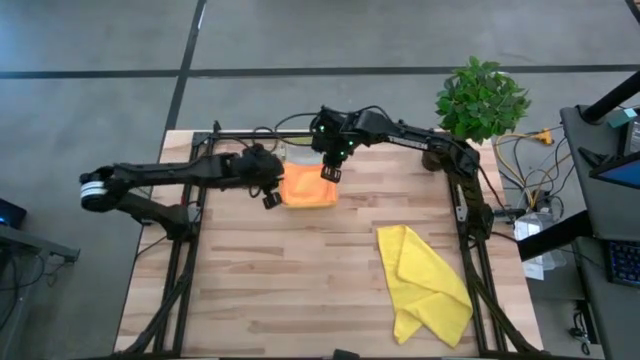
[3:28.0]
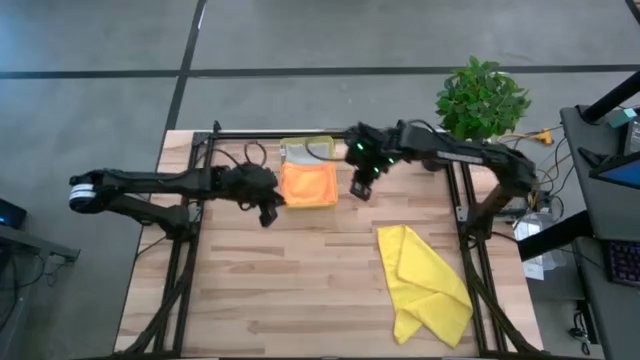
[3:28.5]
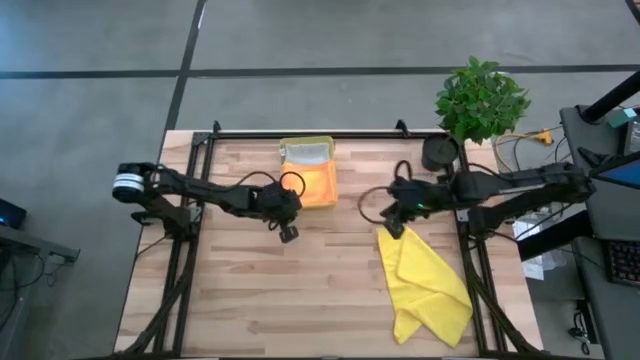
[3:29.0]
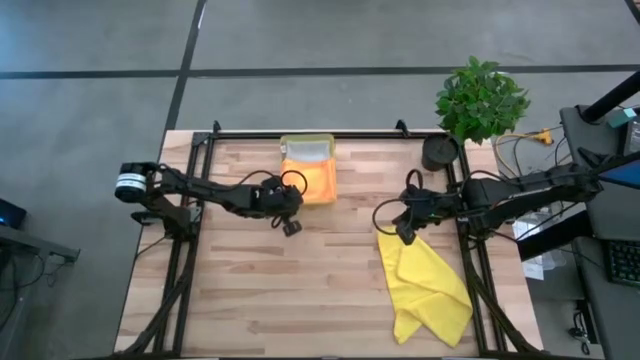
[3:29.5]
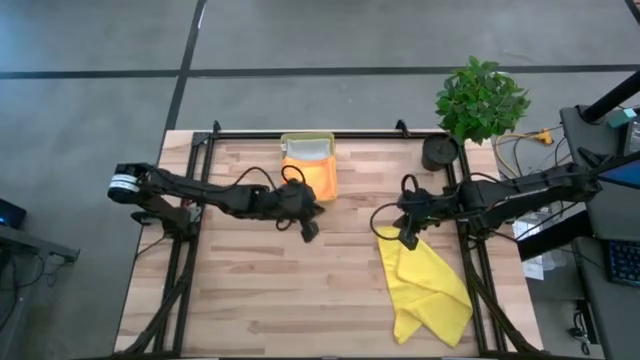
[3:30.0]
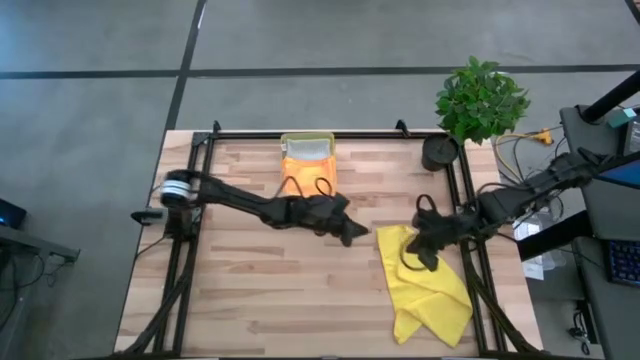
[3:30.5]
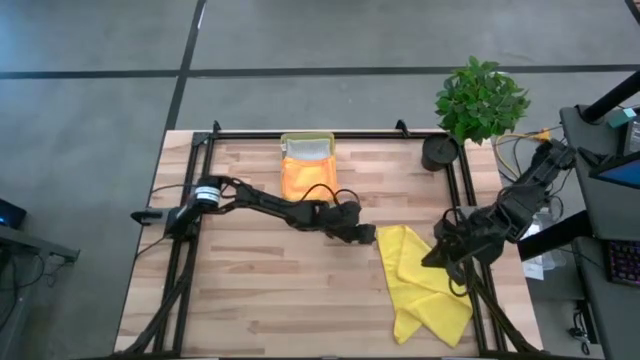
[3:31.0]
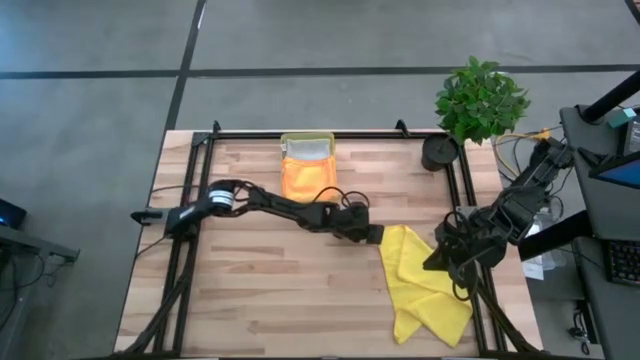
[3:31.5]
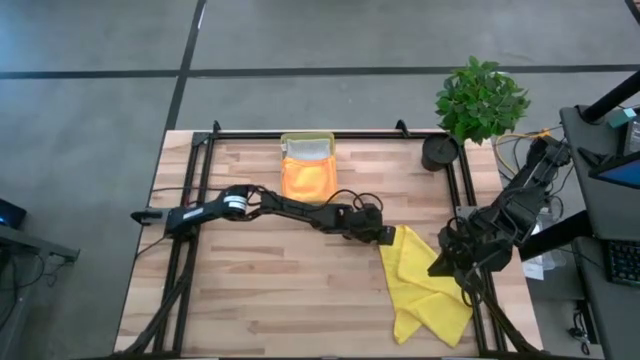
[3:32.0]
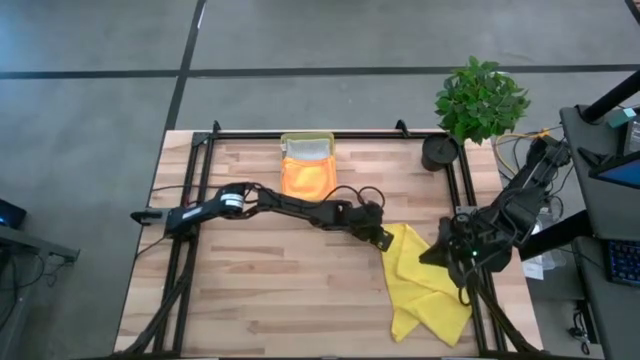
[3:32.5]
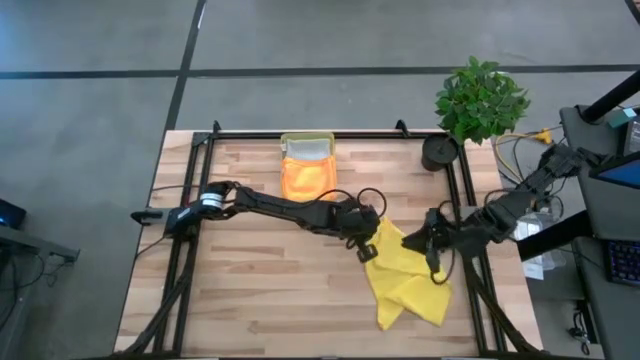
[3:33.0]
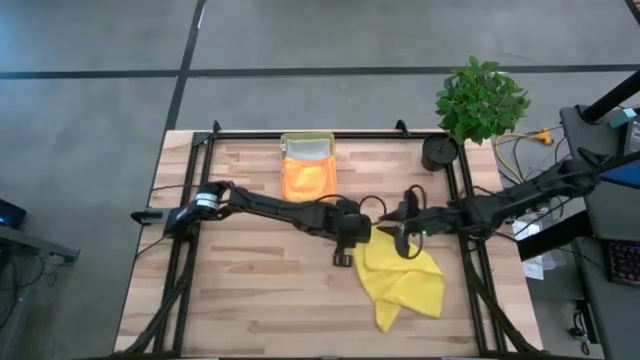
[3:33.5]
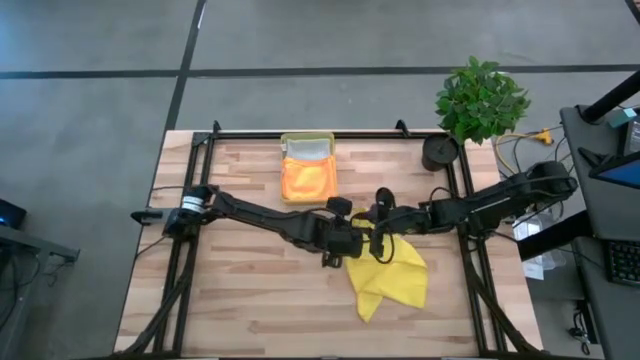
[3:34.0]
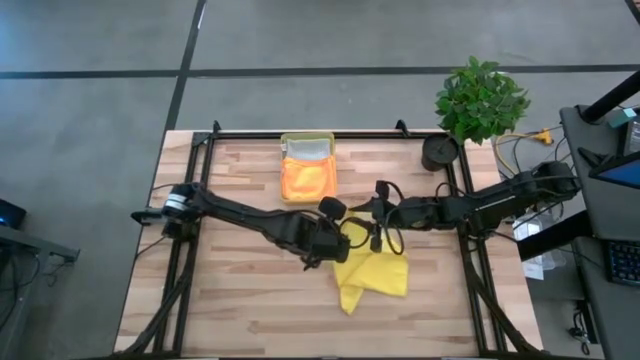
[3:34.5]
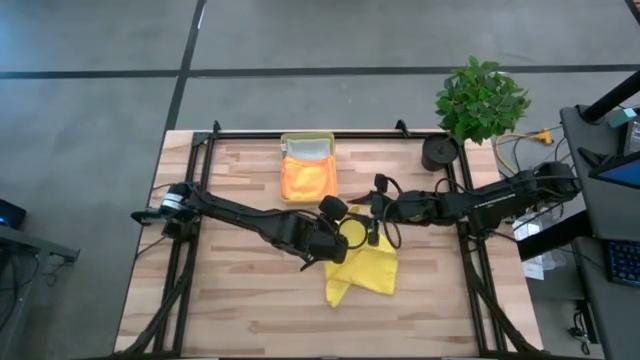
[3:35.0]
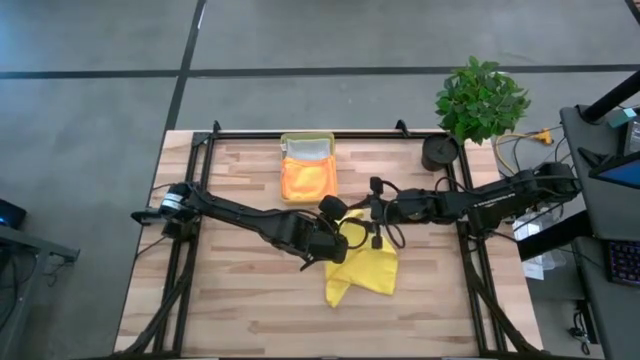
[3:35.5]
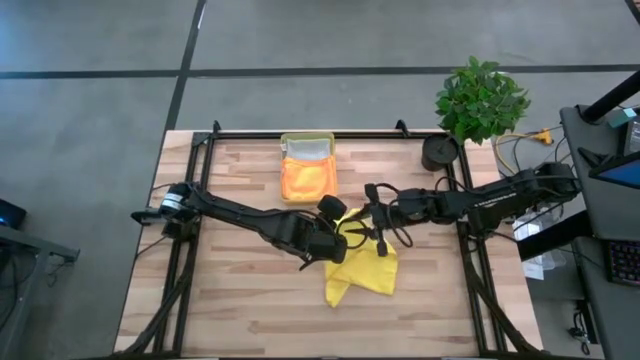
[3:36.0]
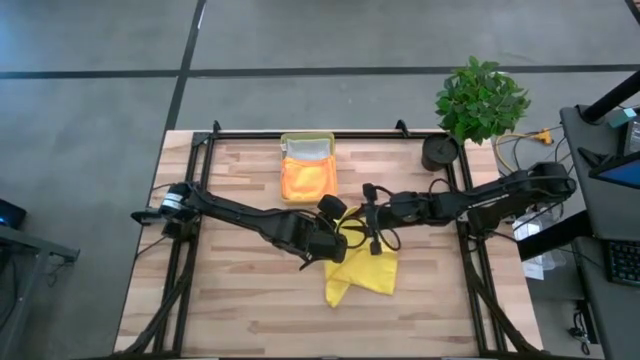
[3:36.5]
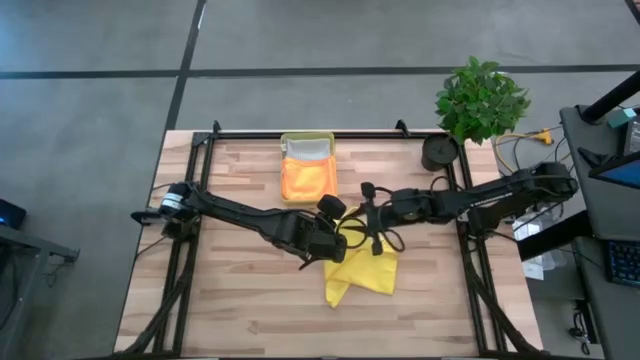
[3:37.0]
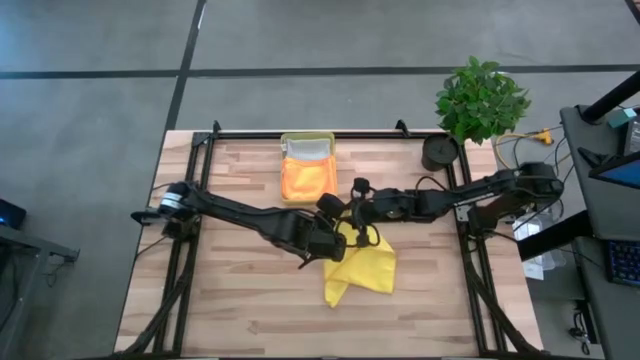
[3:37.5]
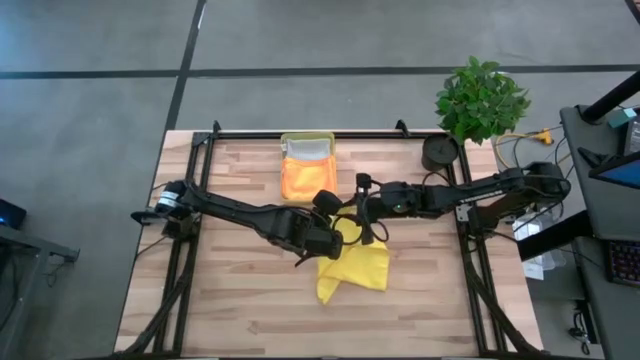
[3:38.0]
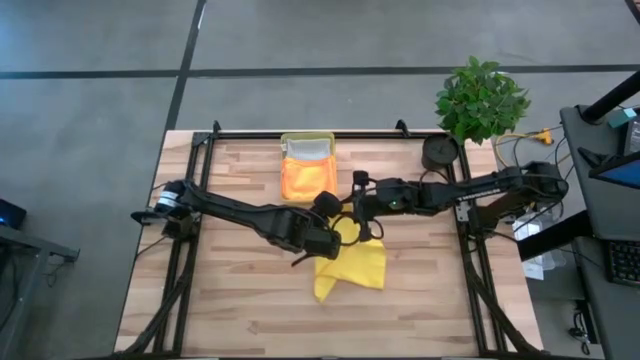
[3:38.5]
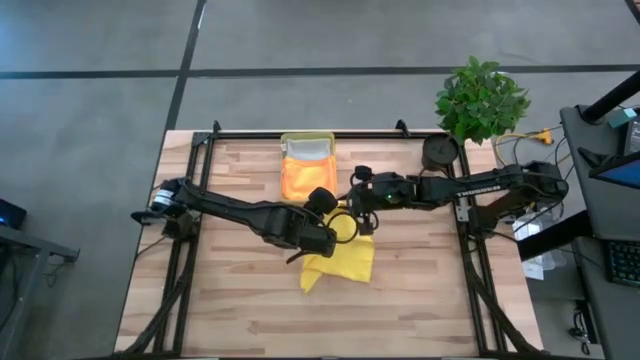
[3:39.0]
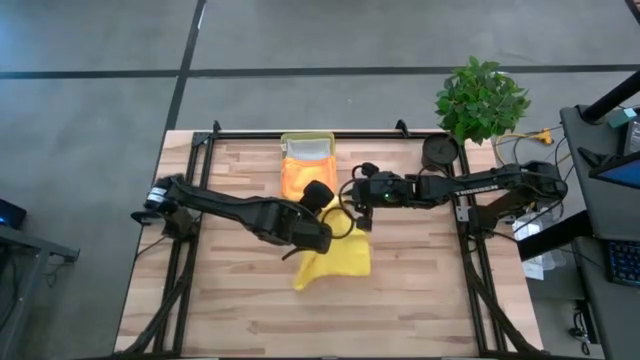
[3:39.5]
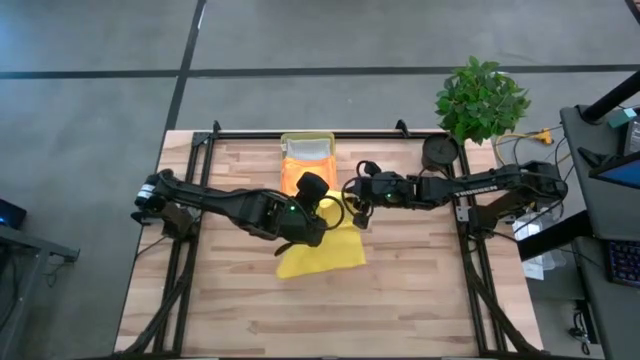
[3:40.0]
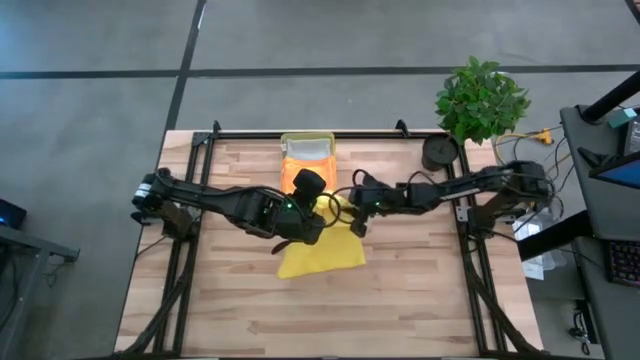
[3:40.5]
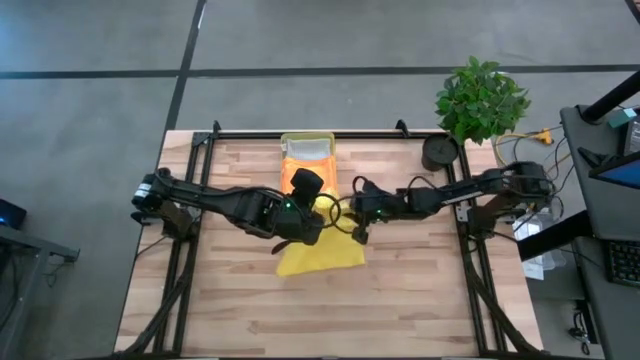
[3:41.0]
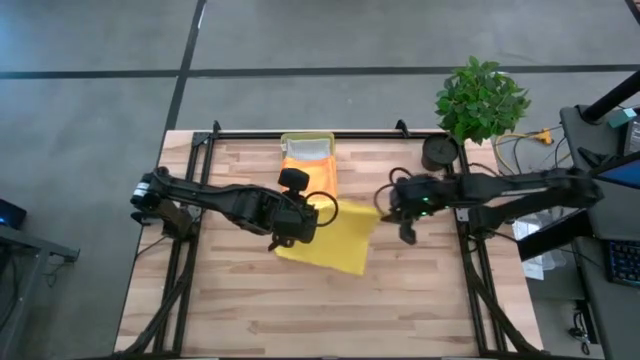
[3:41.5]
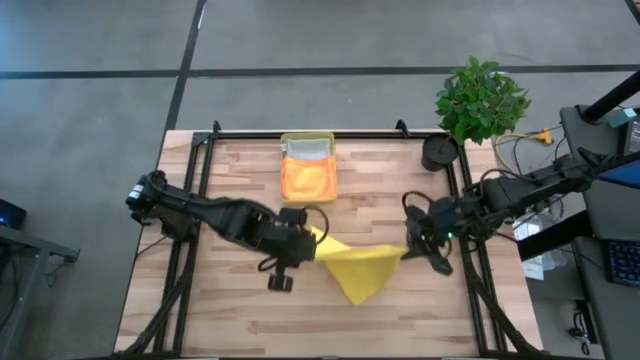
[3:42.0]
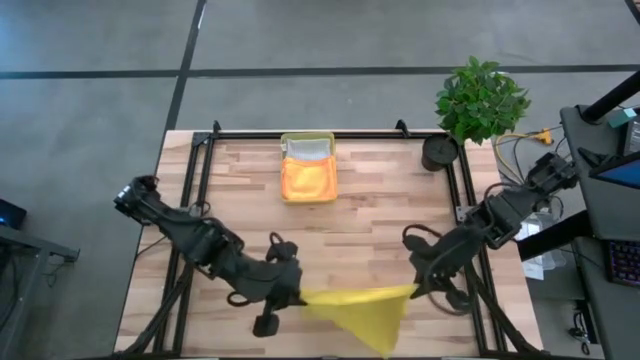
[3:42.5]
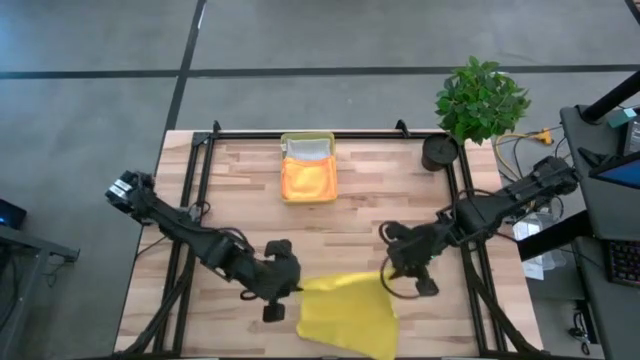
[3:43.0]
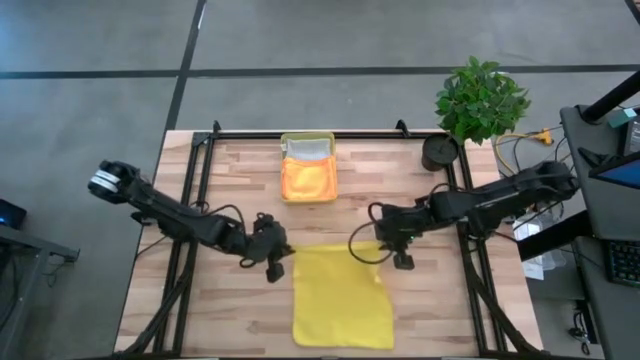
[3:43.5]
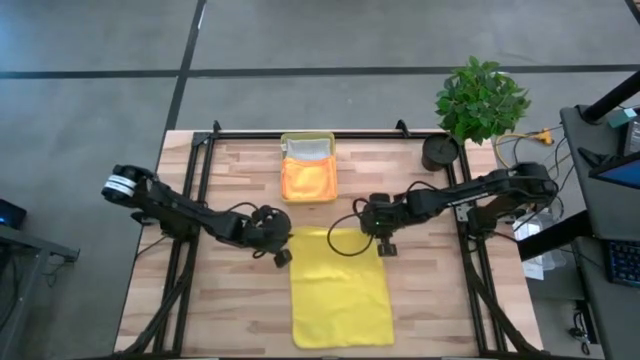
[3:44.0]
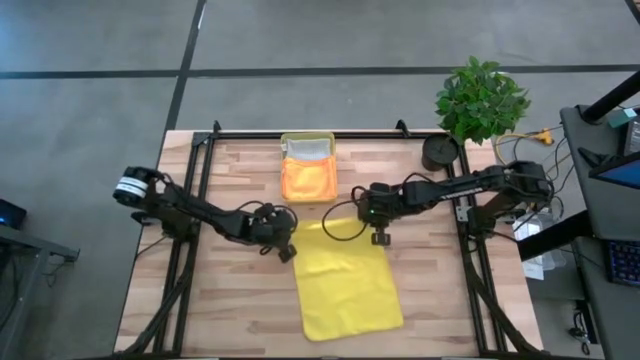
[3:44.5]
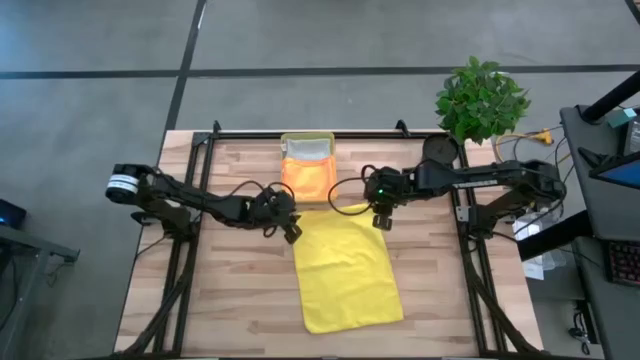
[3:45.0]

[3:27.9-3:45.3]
Task: Fold microfiber towels
Fold the yellow microfiber cloth

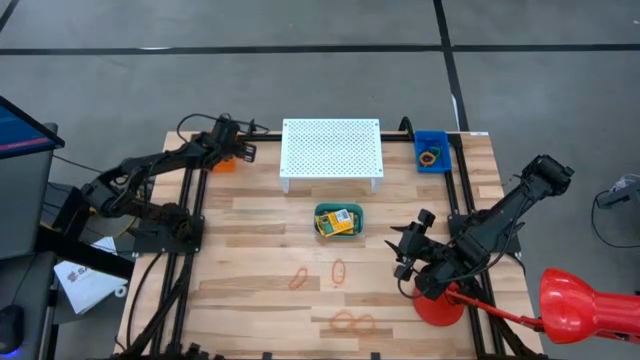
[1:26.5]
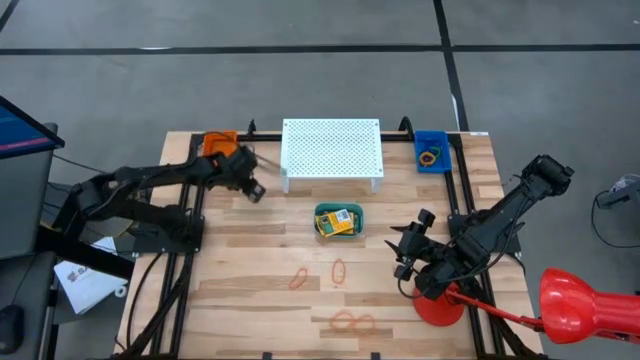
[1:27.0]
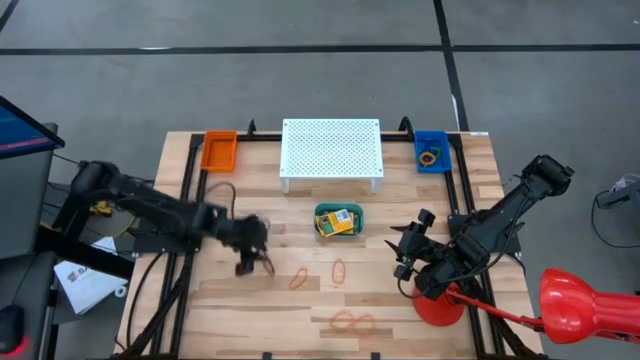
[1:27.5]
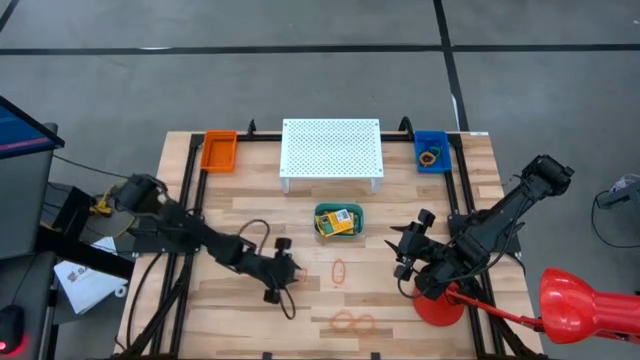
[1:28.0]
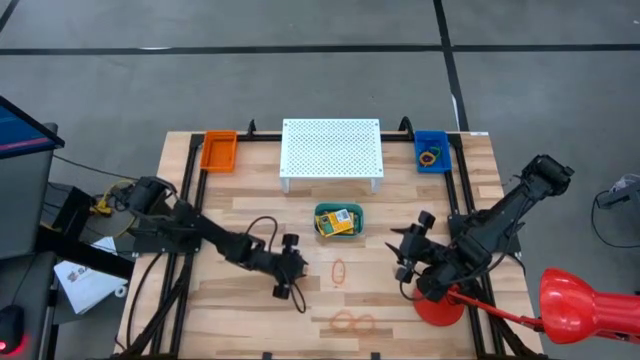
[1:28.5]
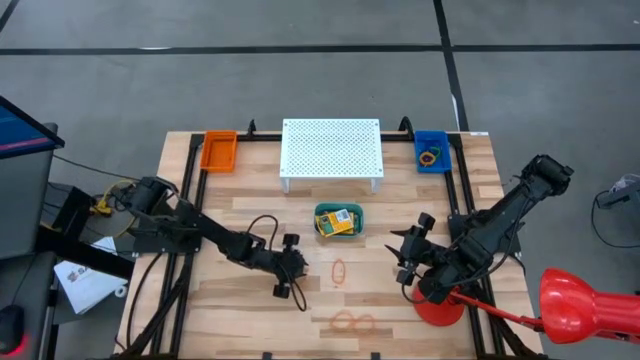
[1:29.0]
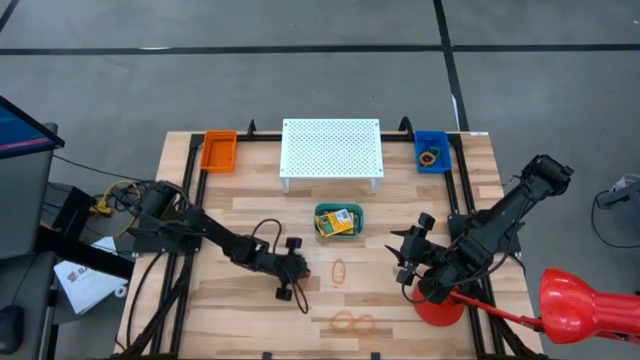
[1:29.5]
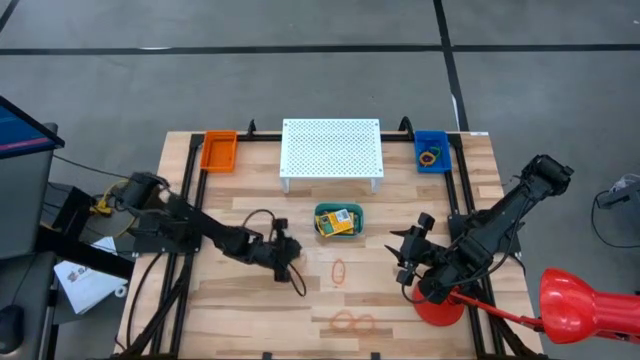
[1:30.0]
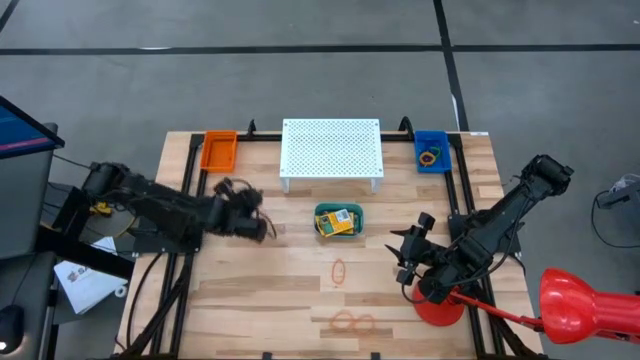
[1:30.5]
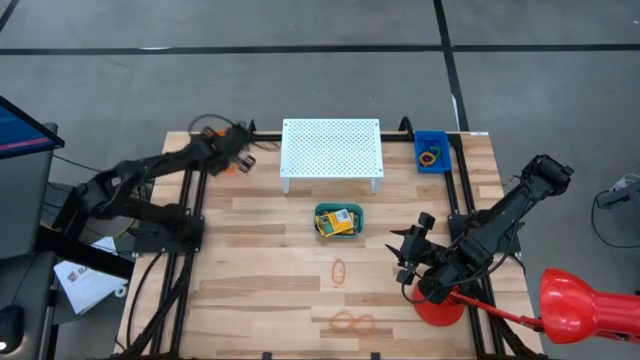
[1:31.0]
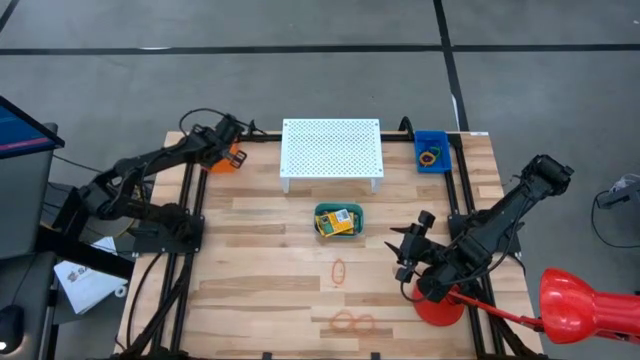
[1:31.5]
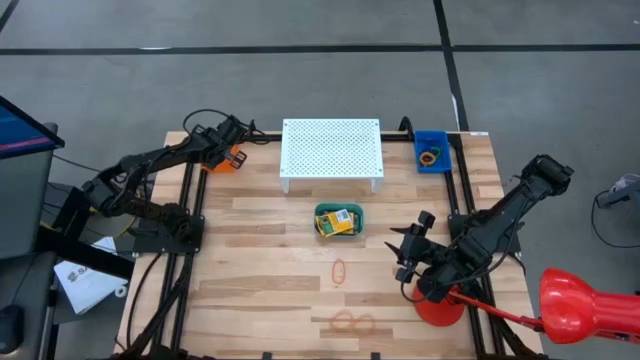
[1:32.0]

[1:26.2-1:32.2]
Task: Pick & Place Office Desk Supplies
Put the orange rubber band into the orange bin
